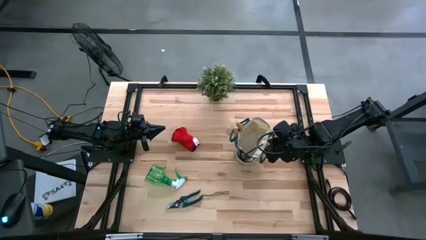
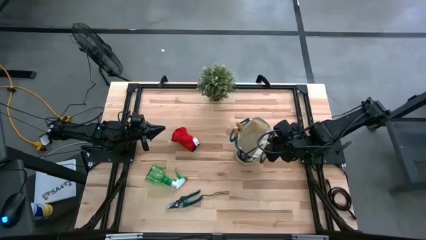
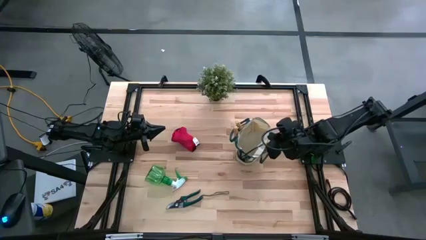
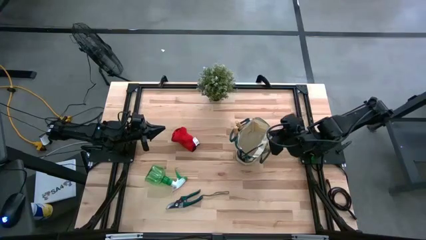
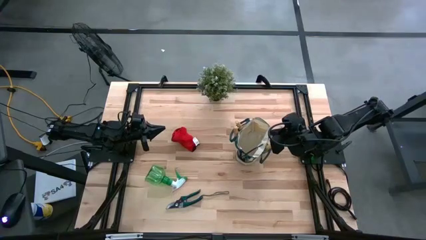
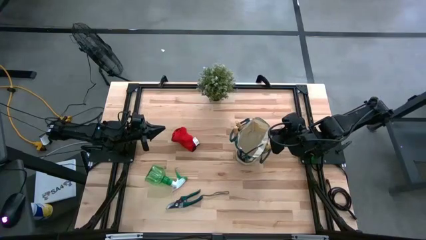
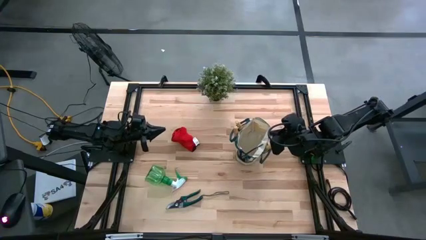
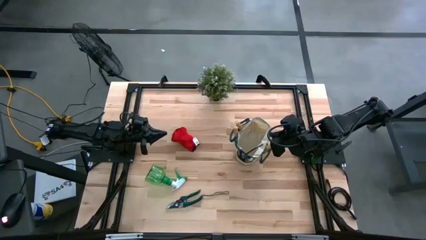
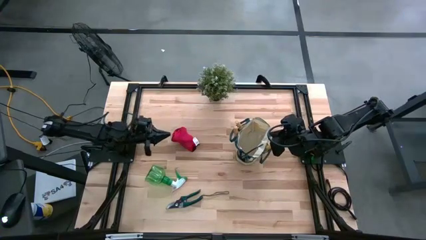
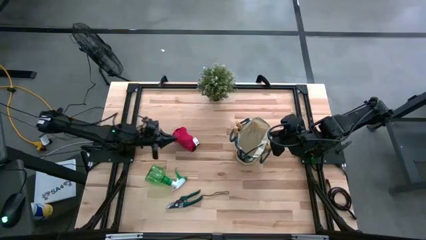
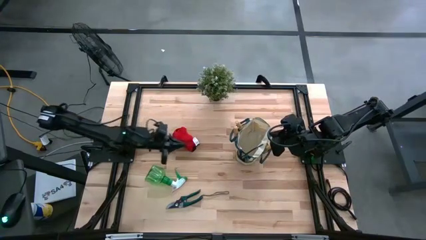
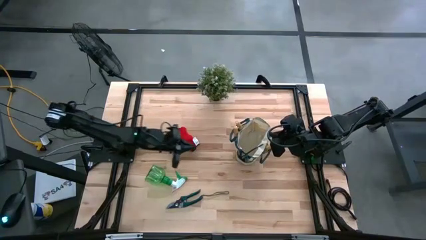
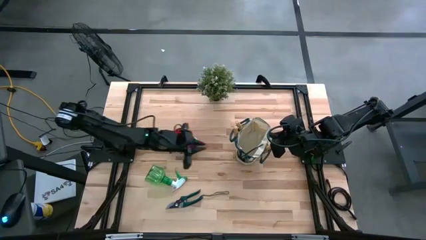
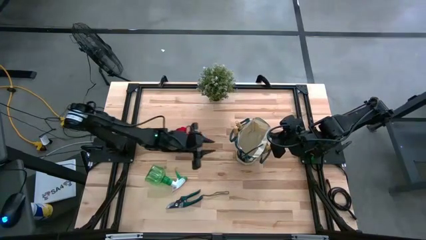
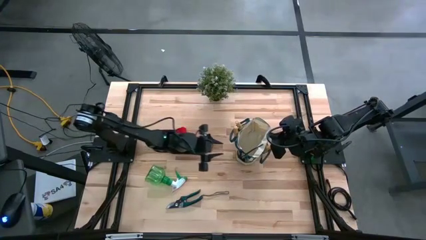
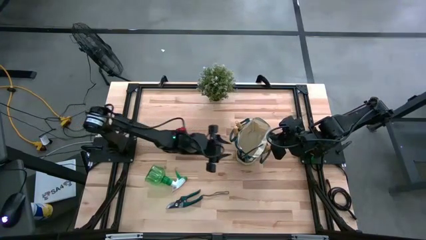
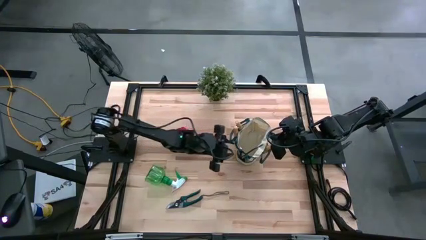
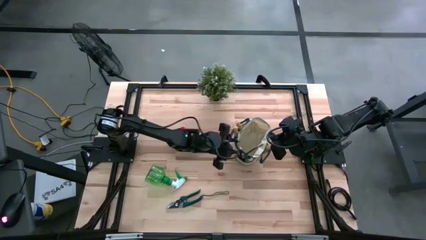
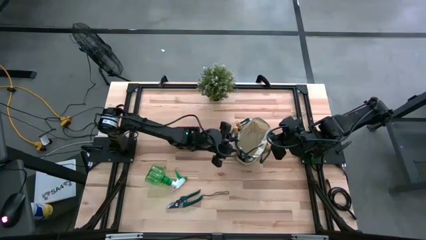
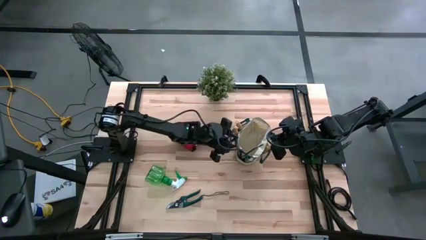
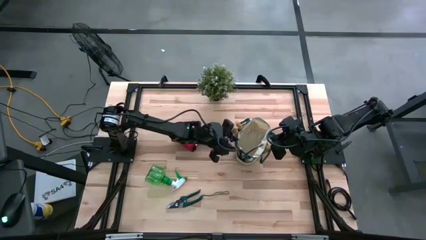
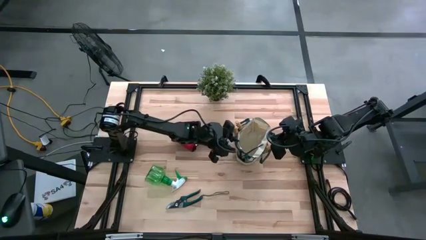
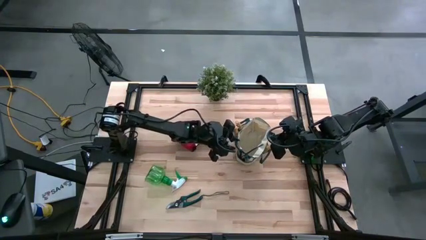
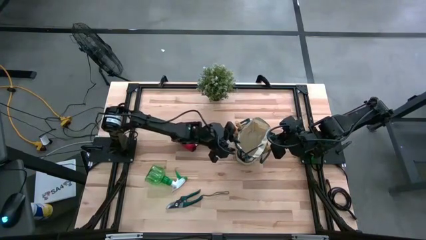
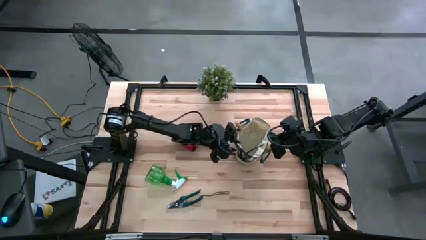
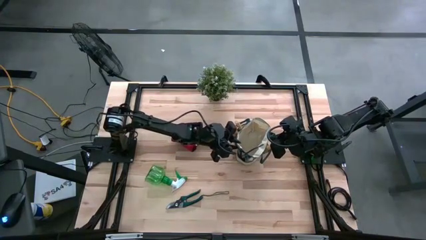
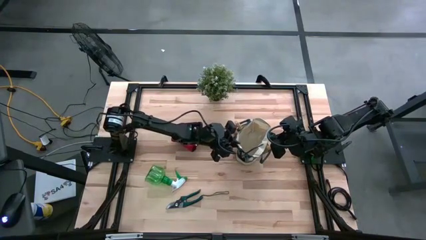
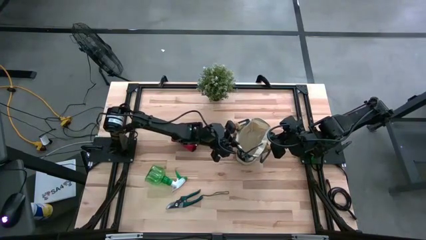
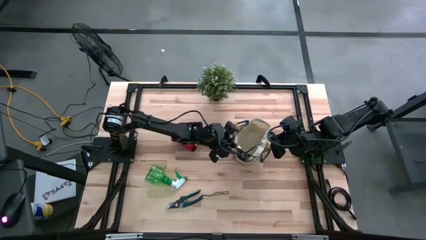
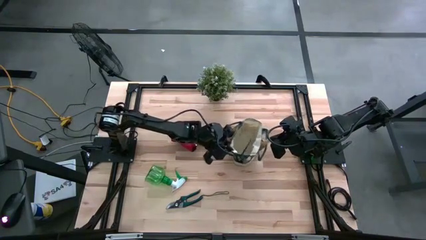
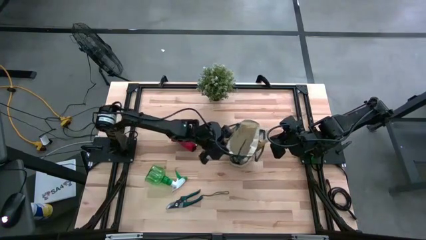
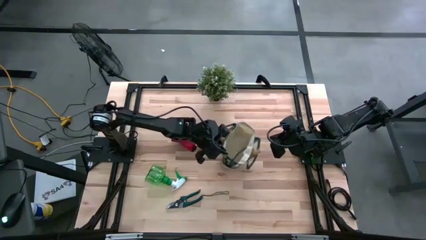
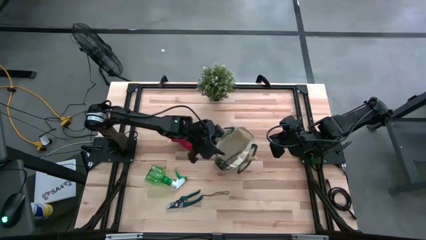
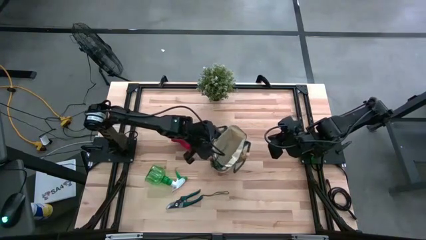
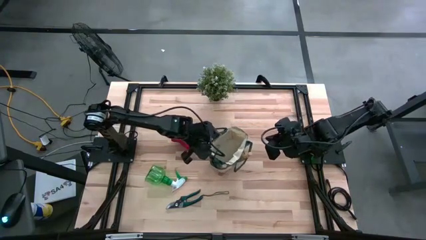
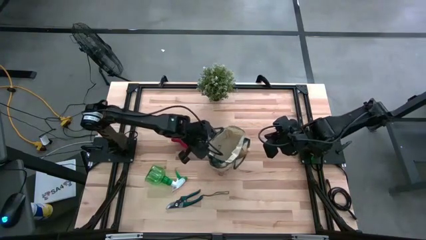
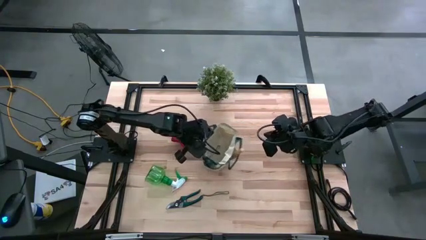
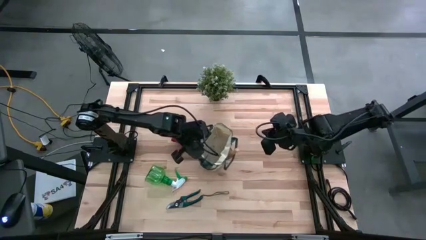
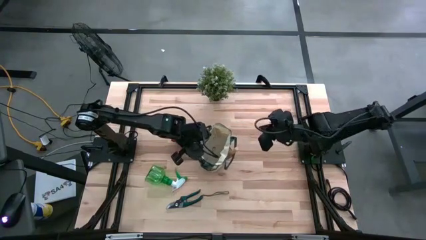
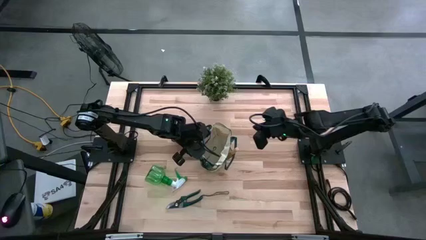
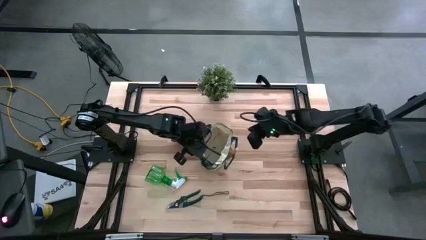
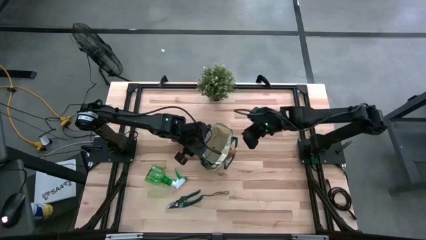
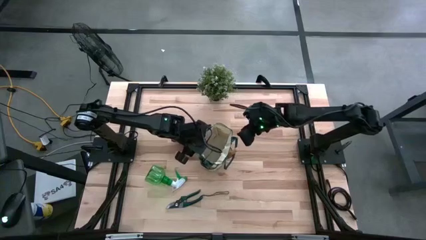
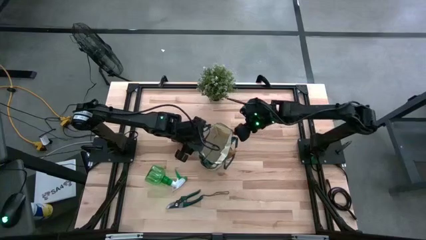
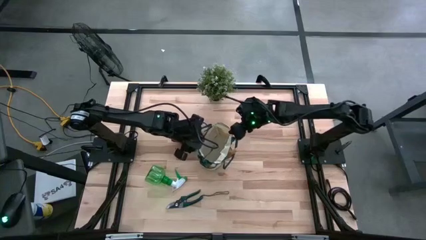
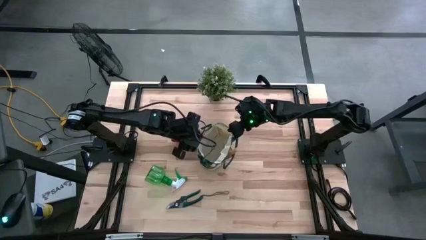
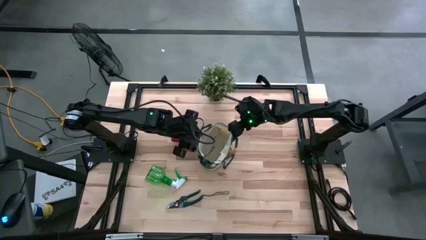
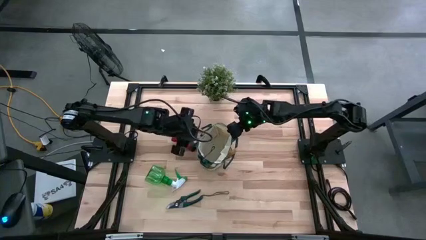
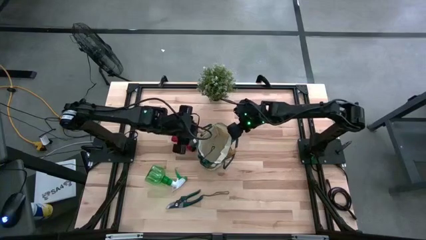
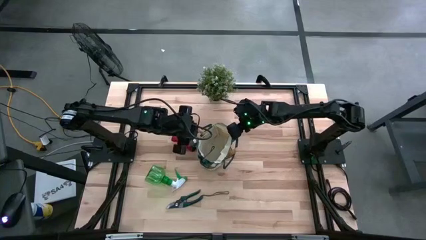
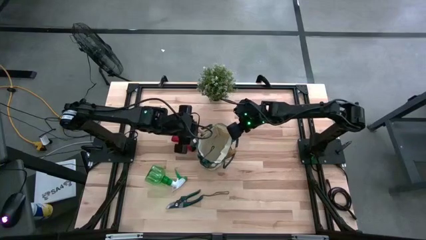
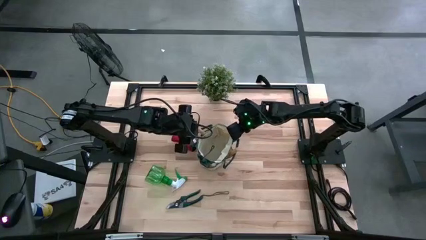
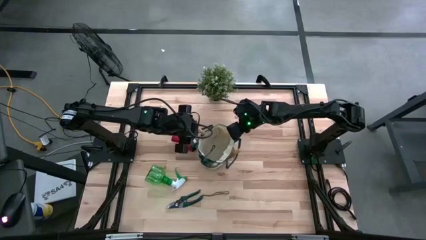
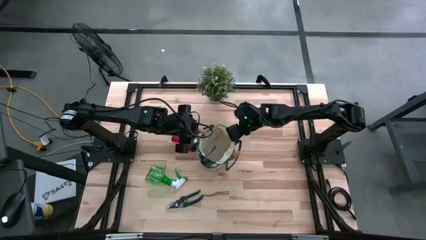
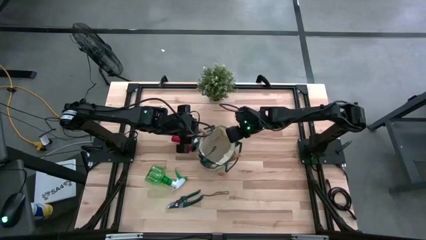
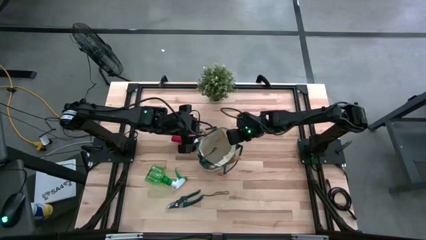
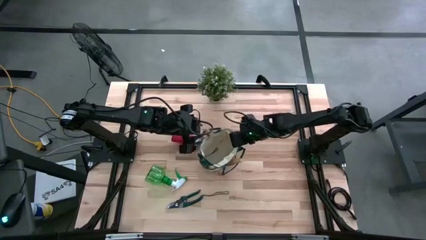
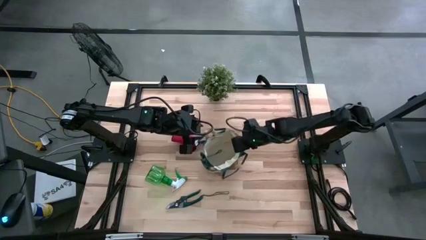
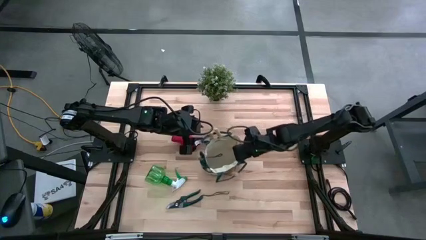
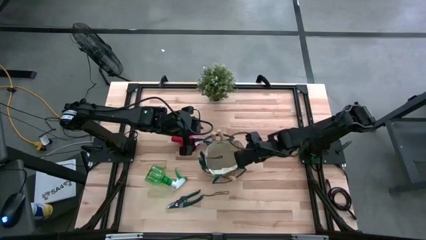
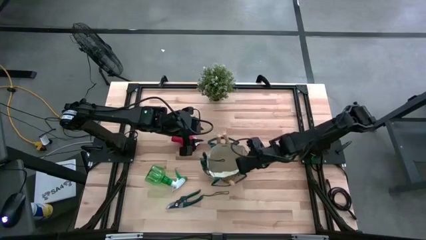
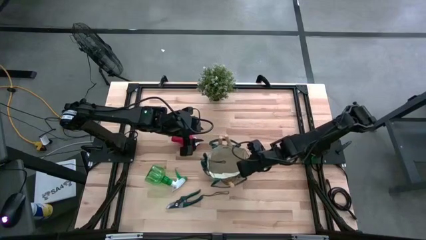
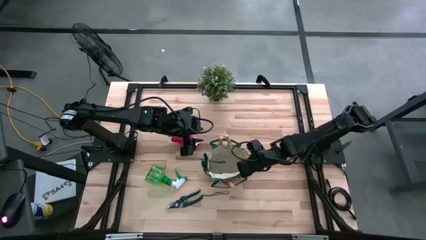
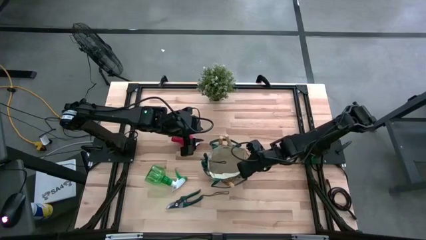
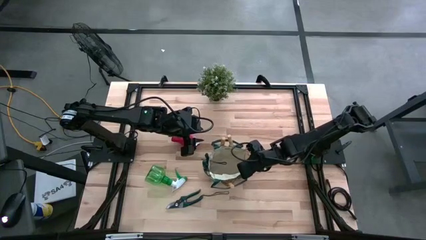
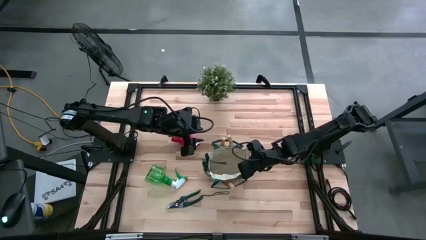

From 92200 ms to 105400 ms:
Task: Pick & Place Garden tools in Gardening bag
Adjust the gardening bag on the table

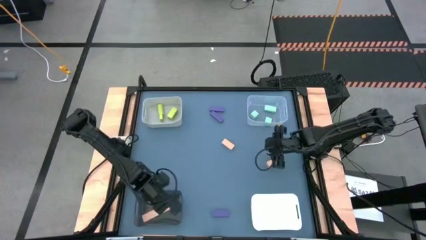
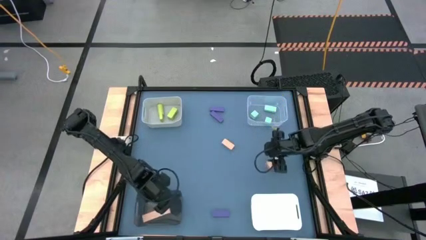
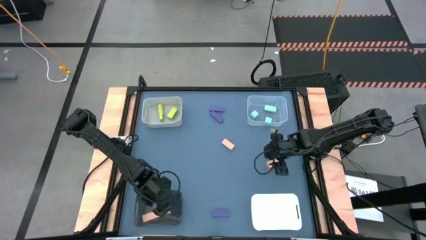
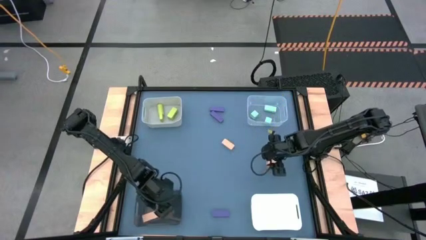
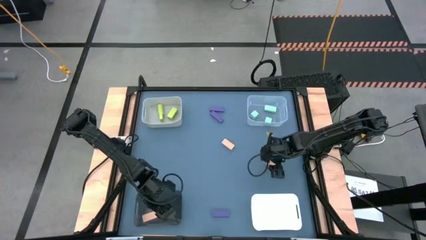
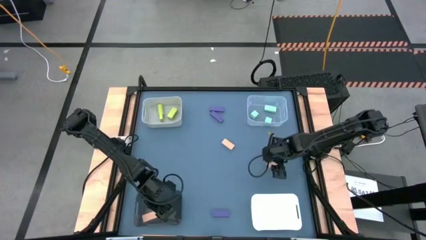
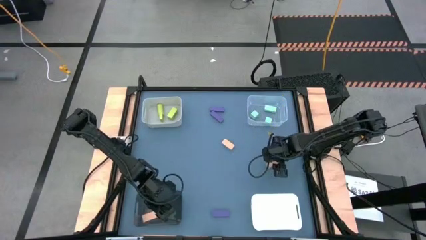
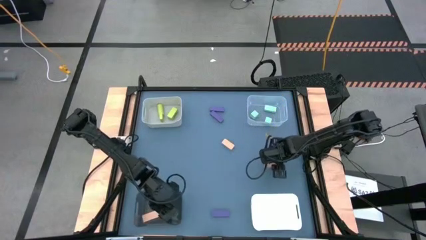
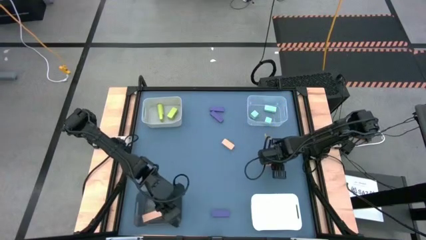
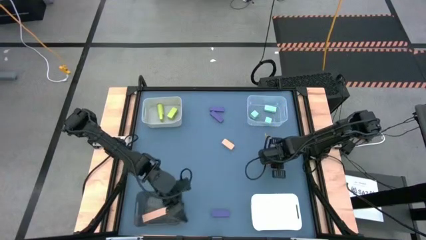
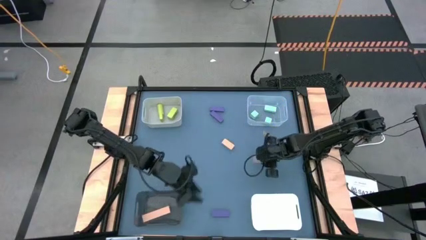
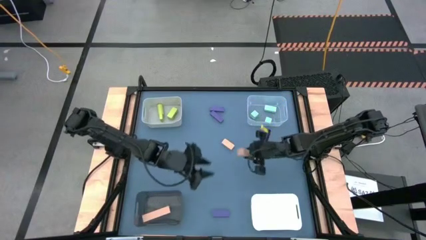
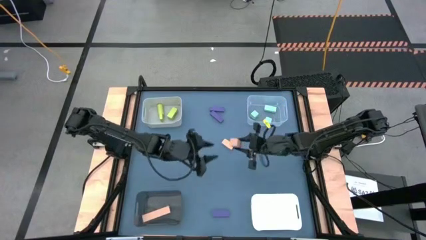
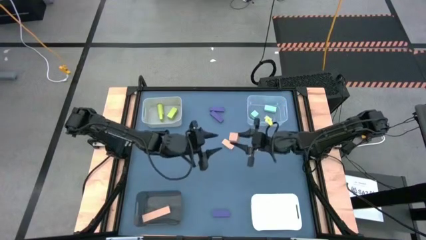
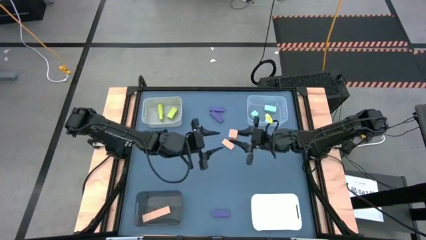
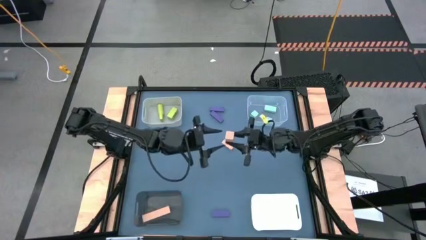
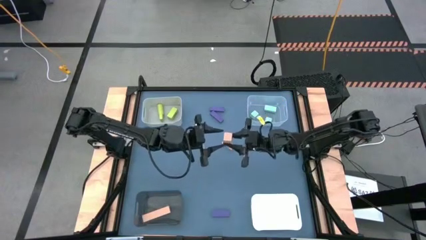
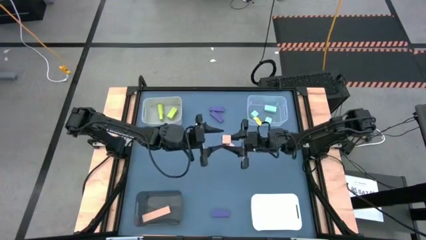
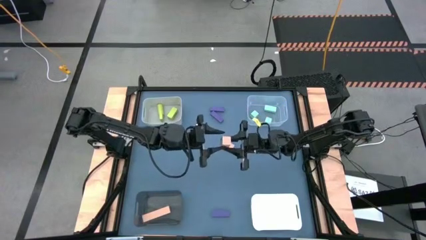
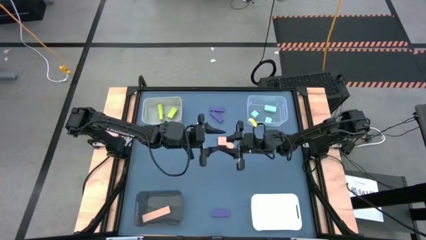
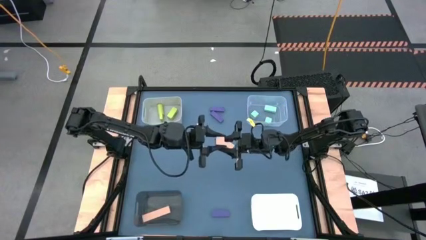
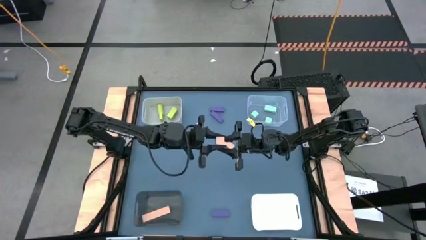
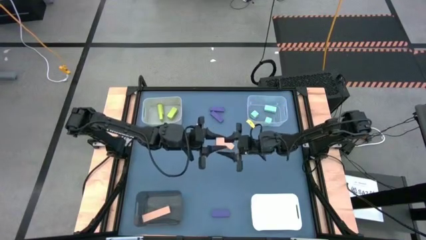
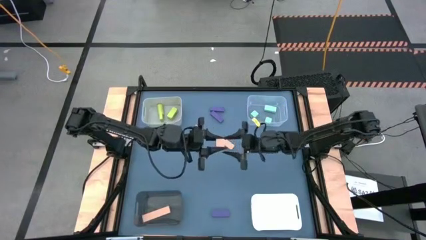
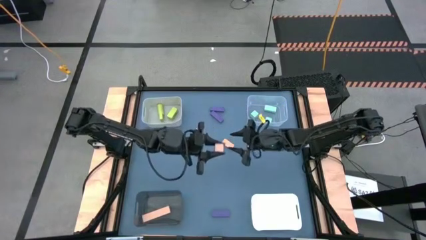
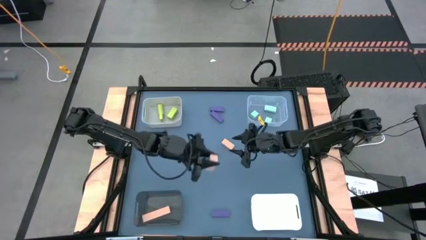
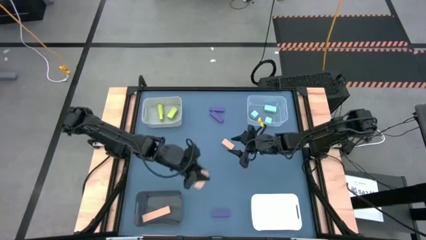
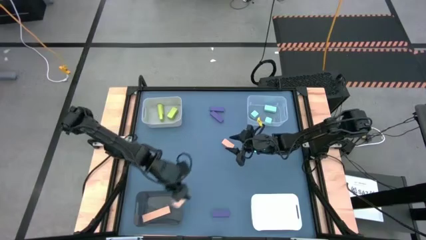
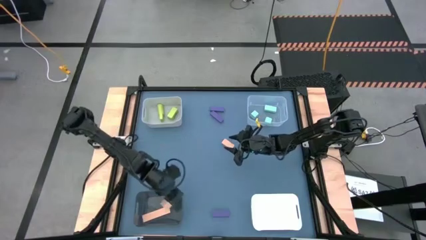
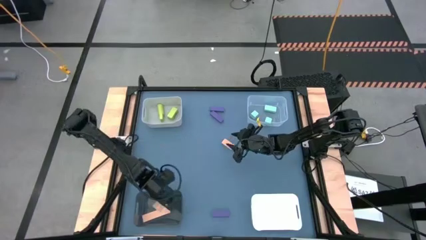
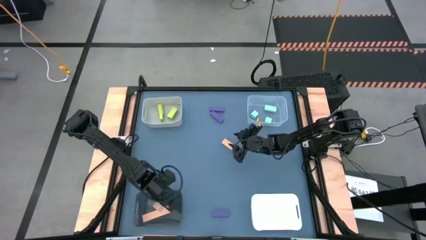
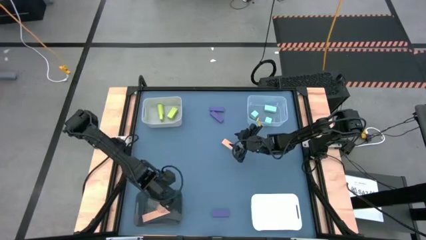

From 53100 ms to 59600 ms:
Task: Sort & place blocks by color
Put the orange block into the black bin
